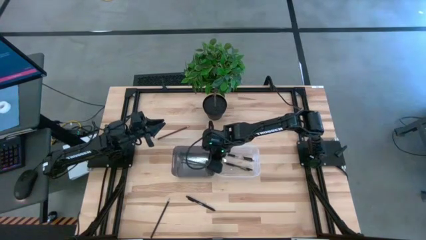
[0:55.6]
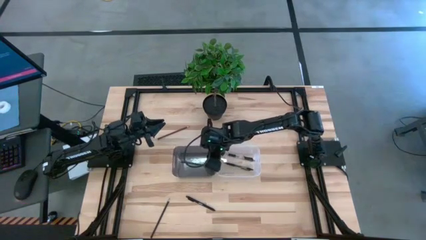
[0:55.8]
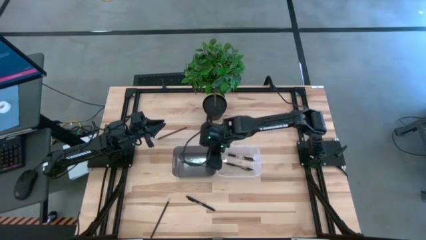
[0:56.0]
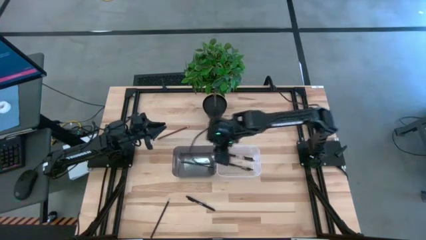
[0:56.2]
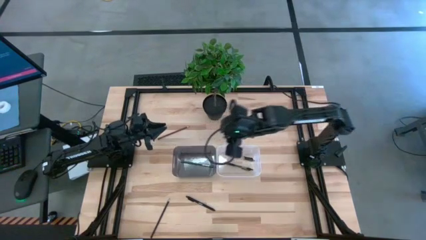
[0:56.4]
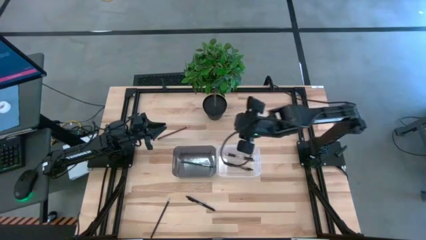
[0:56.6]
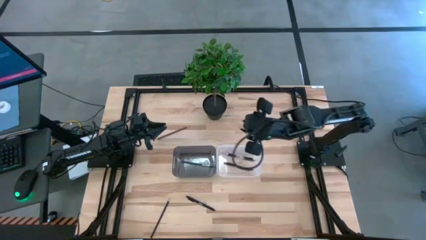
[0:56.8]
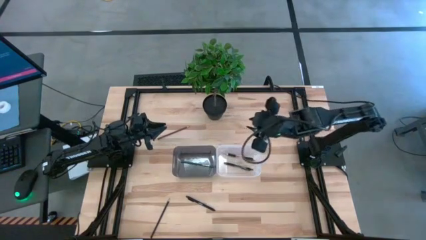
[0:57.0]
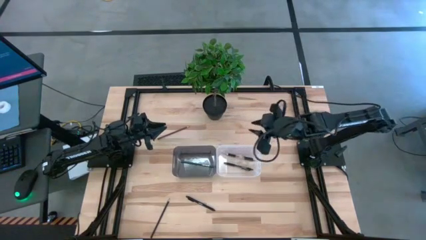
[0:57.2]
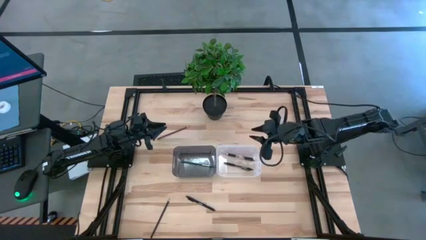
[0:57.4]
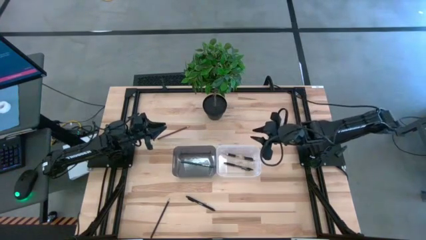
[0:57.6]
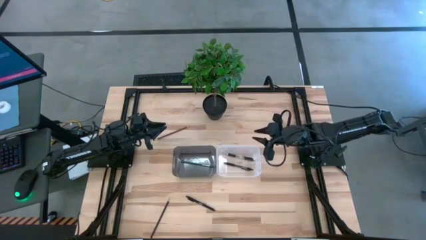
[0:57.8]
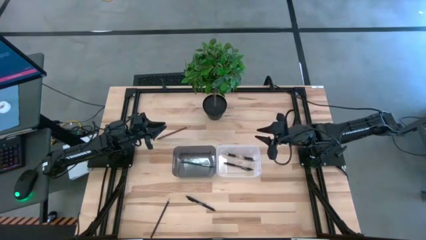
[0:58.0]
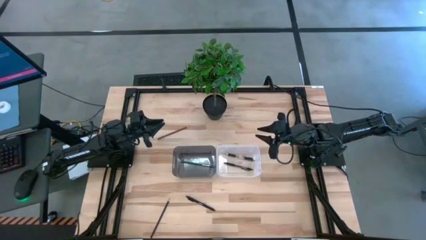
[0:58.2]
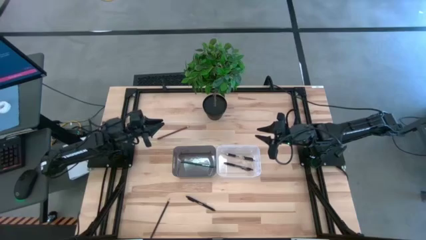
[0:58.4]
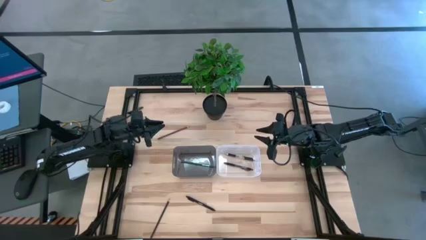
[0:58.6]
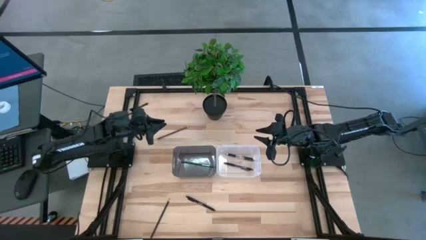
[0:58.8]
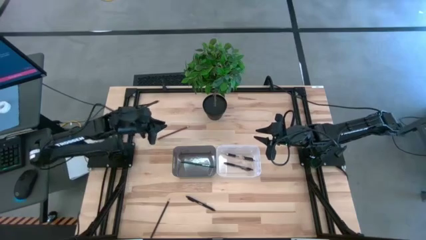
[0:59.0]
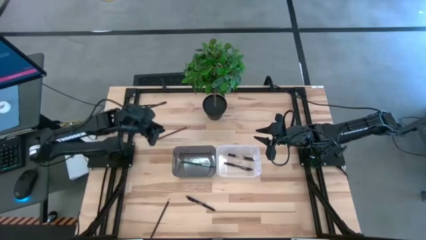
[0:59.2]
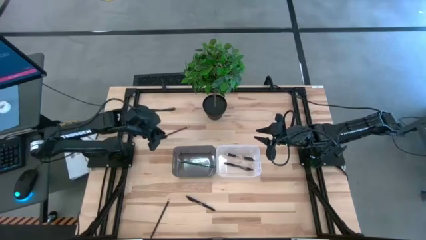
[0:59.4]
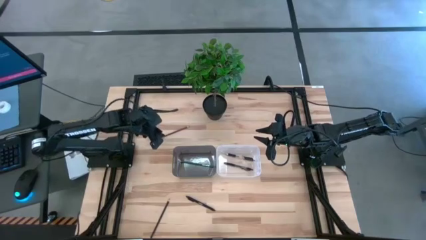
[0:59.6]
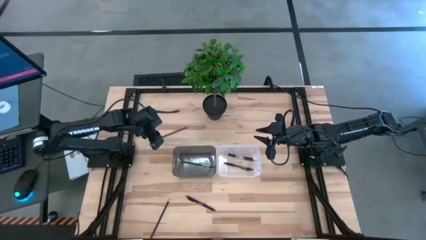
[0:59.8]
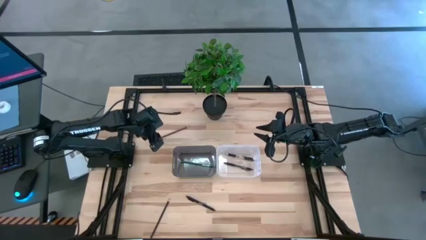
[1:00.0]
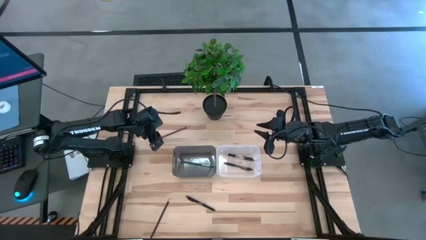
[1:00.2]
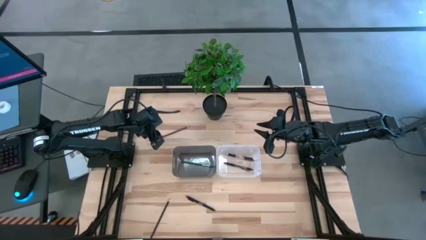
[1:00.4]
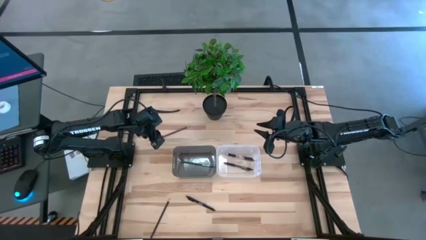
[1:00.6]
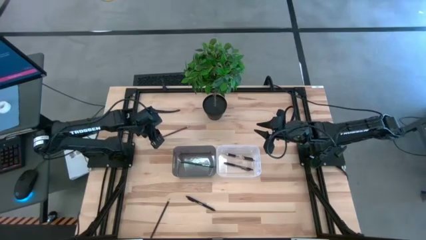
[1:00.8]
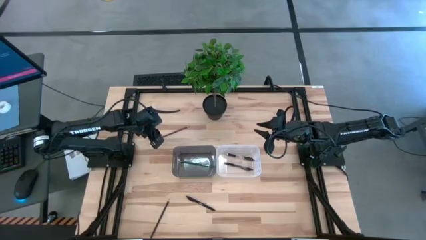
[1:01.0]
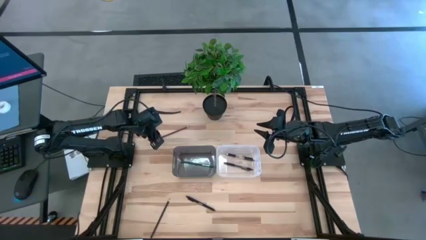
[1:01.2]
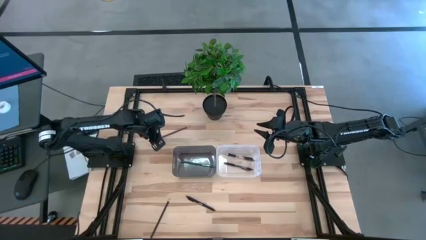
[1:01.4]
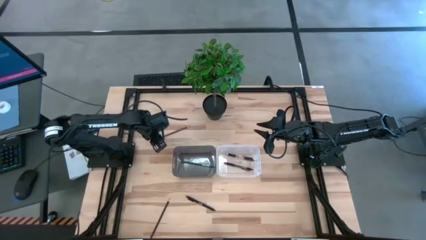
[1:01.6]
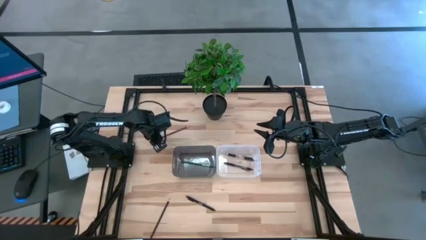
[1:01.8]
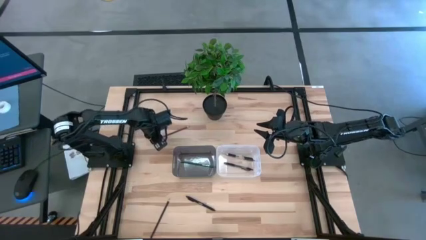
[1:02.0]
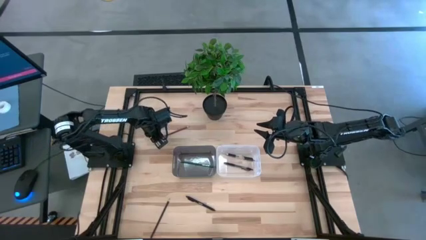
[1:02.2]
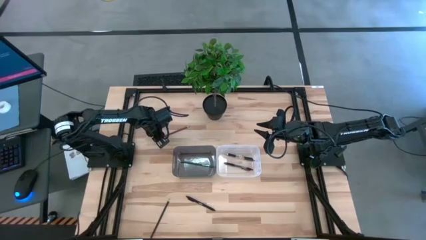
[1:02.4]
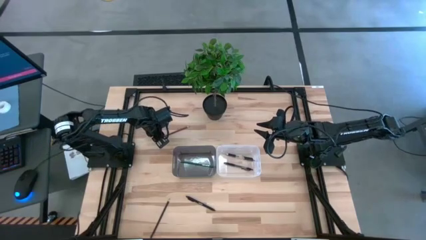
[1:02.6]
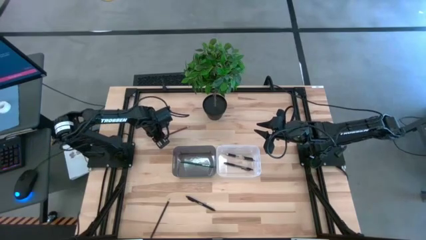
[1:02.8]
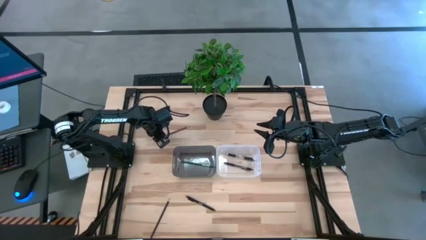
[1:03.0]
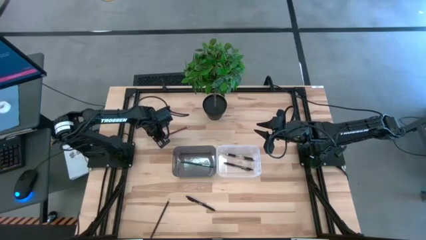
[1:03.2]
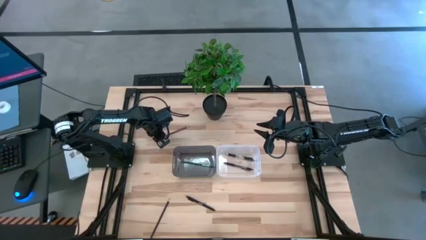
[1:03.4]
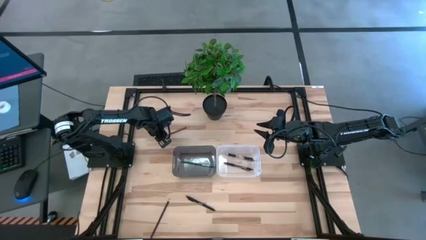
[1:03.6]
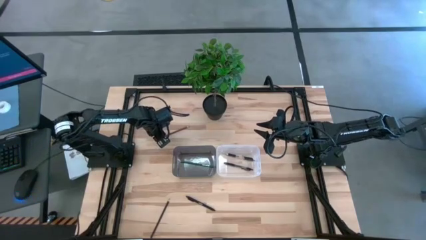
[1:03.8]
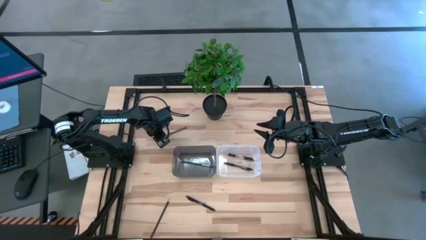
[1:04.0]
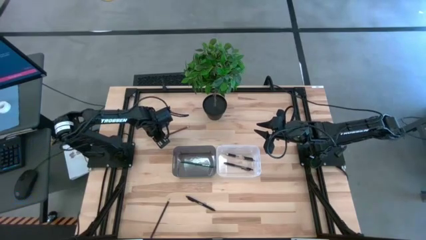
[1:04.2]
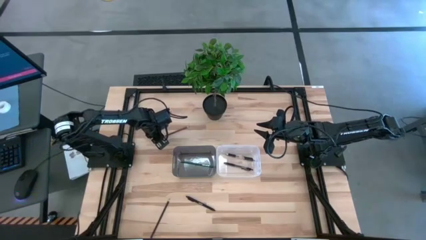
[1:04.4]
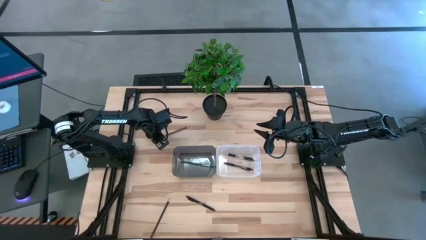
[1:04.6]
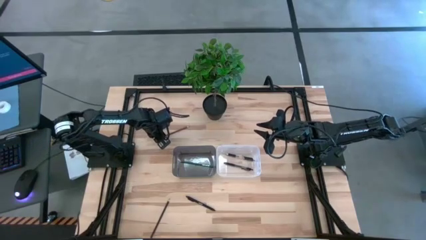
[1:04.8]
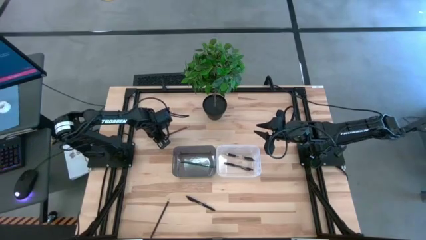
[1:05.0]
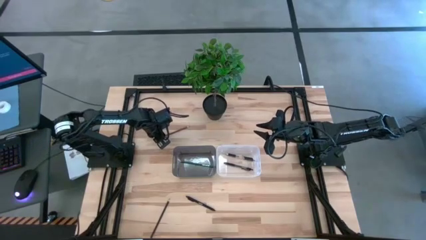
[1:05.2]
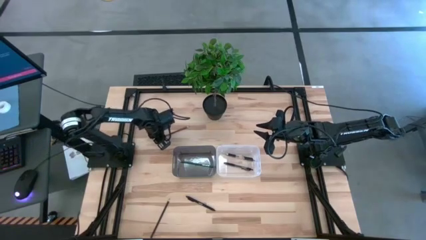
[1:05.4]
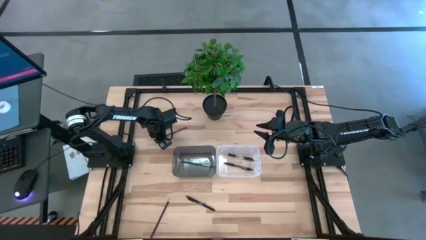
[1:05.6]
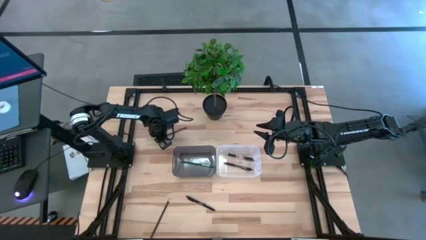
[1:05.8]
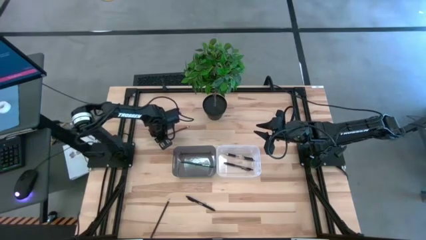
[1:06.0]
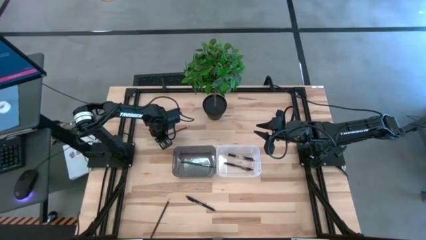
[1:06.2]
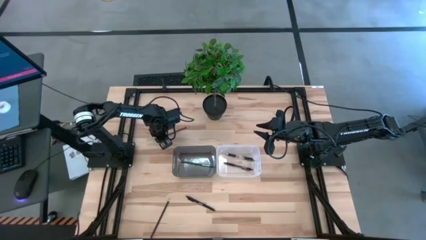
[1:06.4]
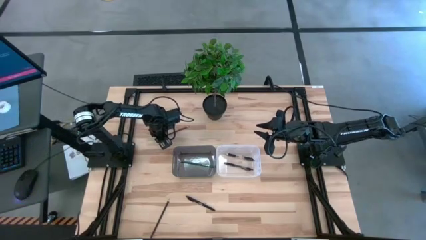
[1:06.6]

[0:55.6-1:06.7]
Task: Sort pens & pencils
Put the brown pencil into the black bin
